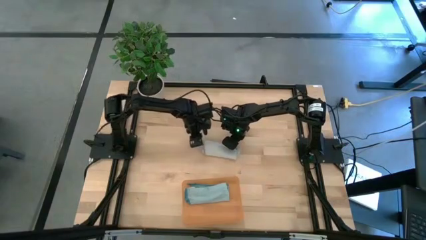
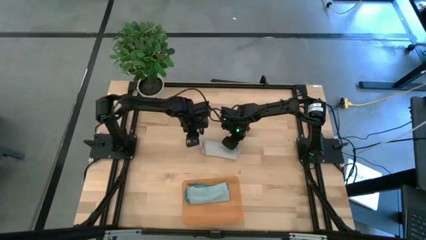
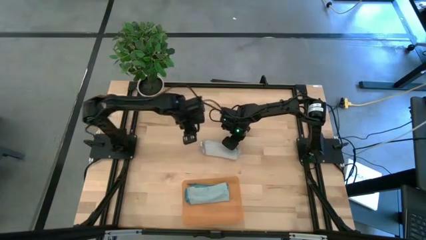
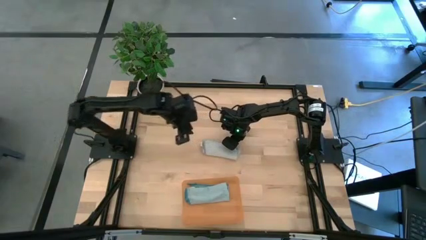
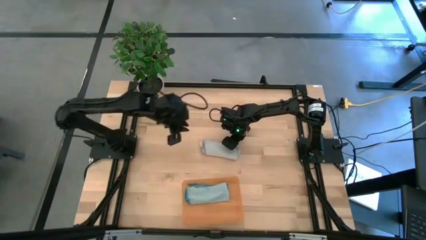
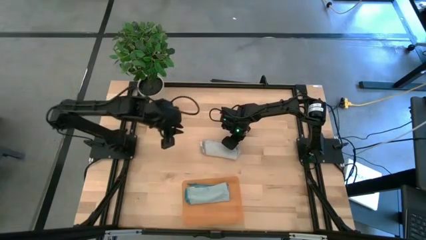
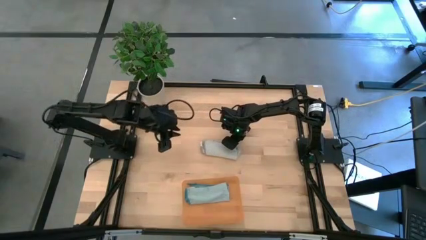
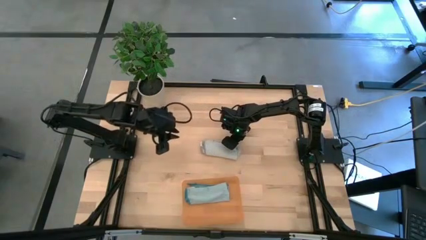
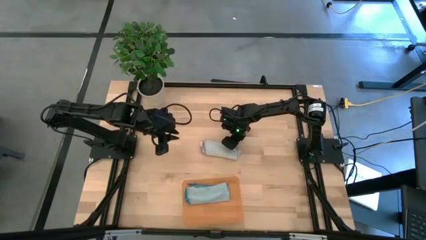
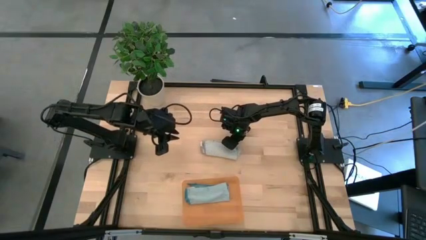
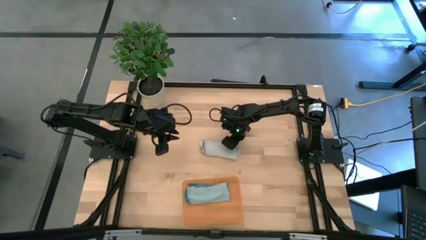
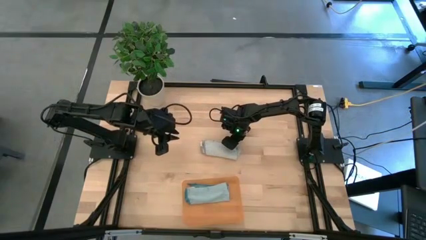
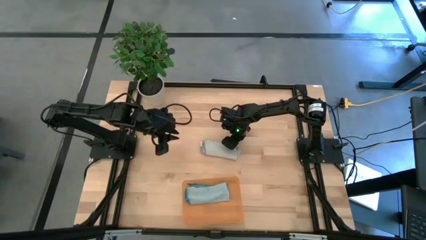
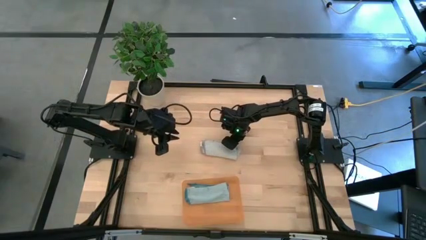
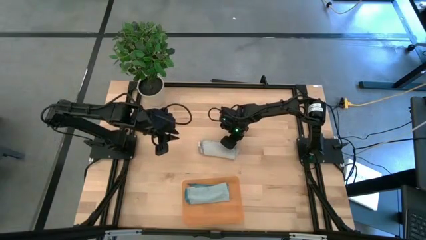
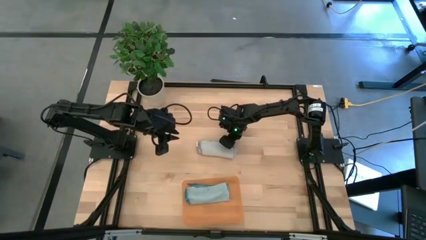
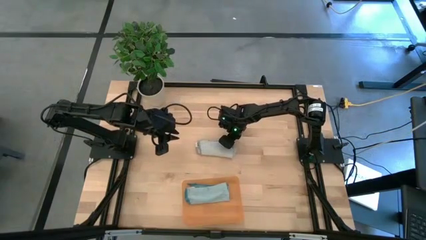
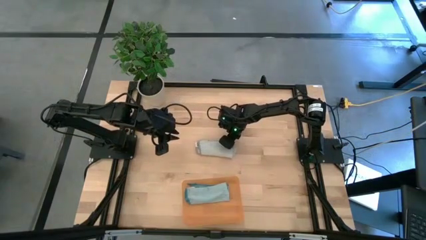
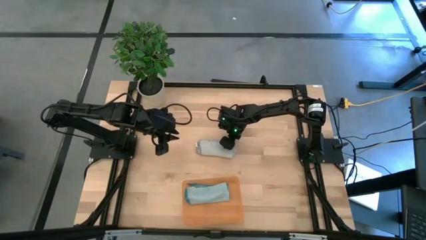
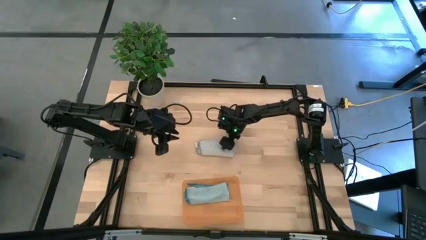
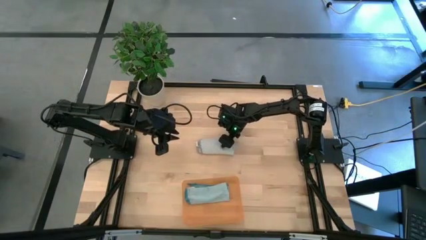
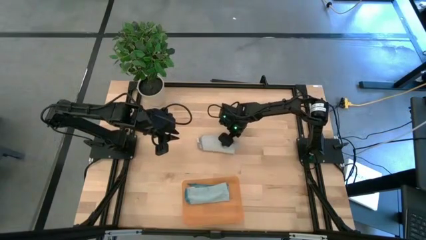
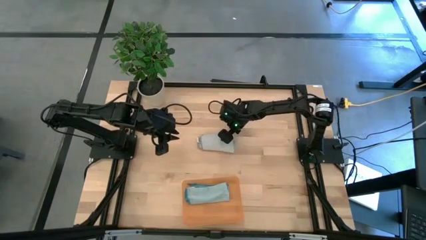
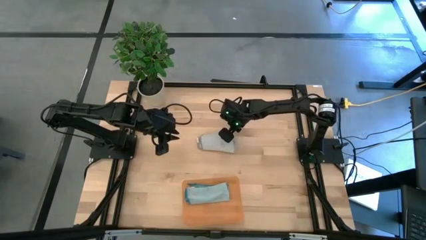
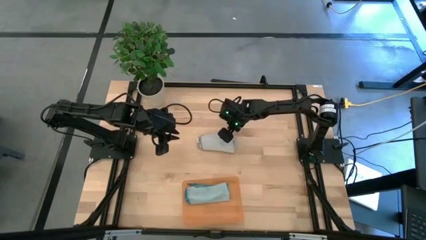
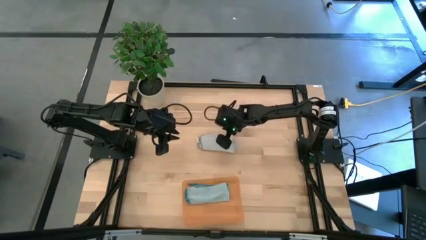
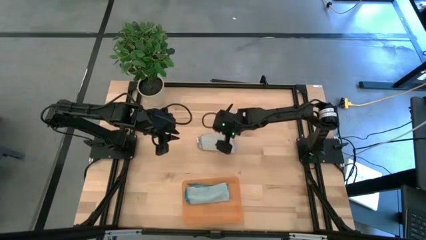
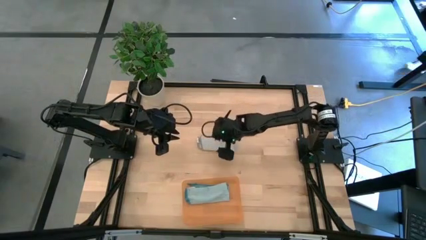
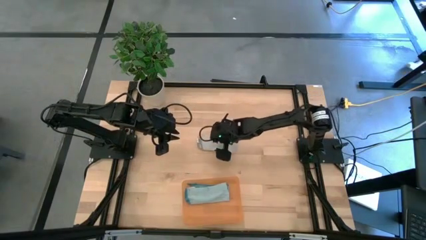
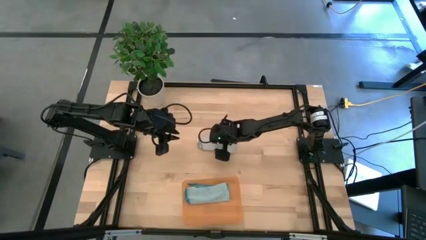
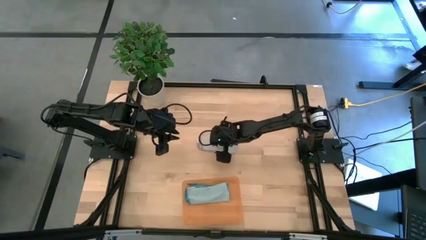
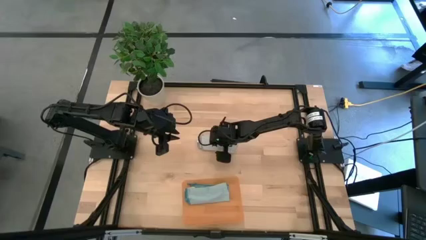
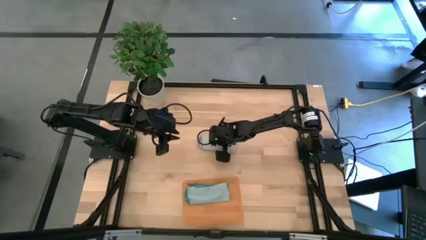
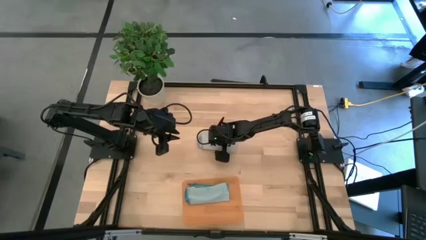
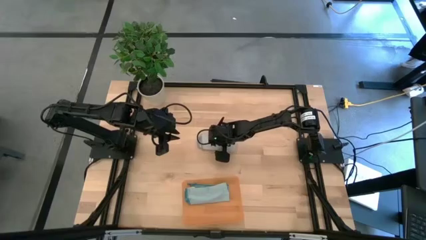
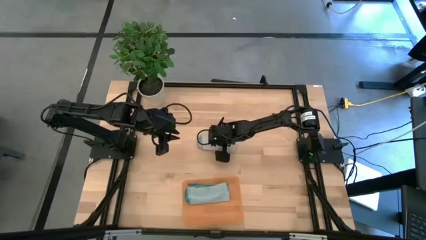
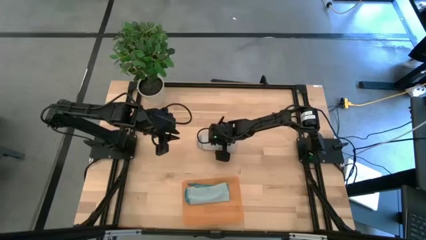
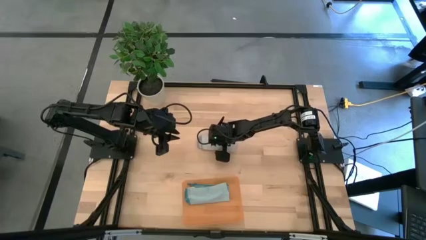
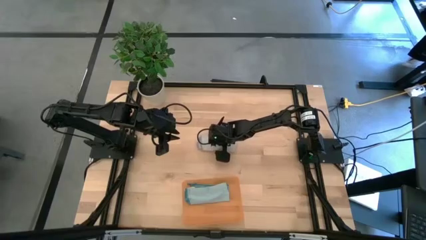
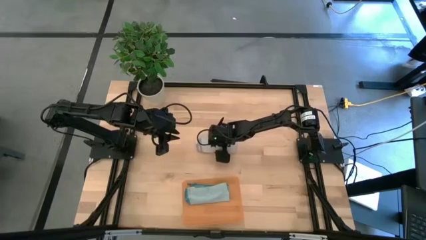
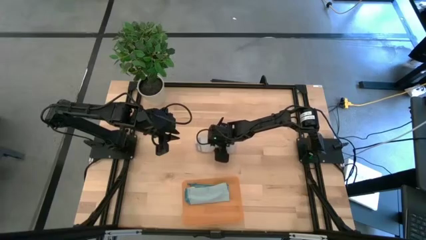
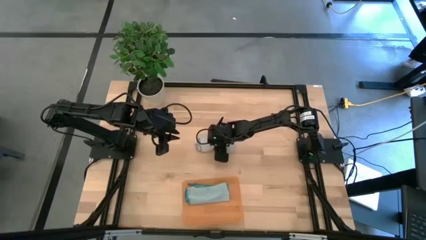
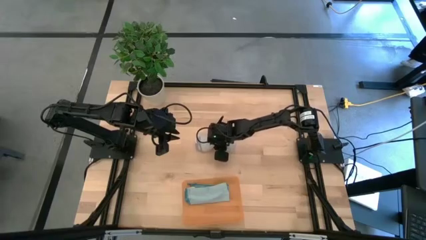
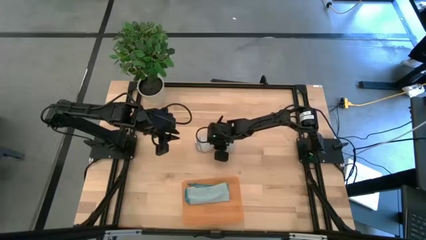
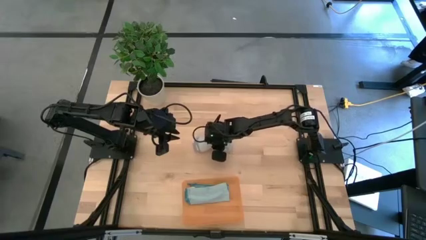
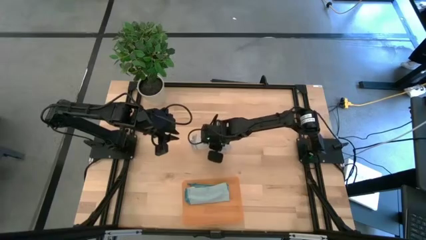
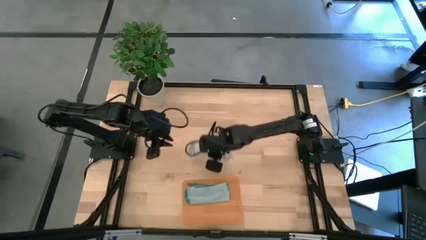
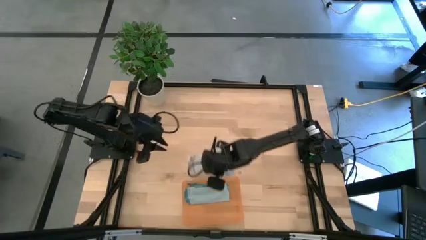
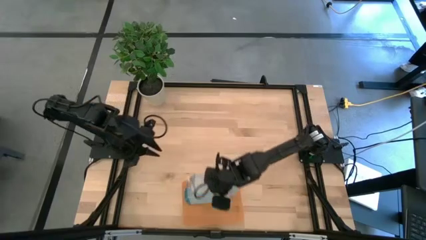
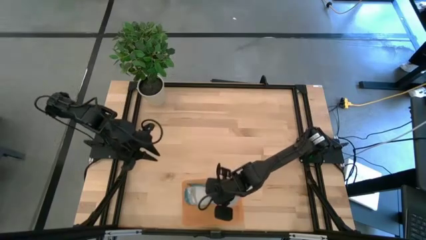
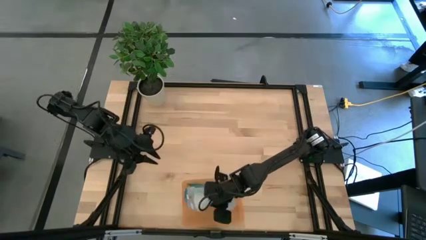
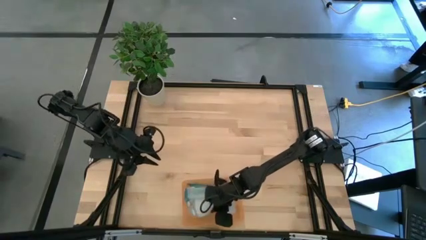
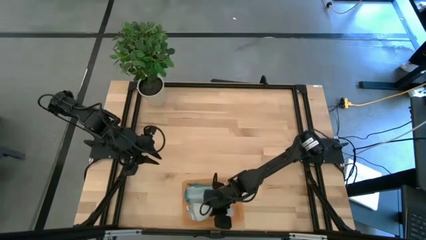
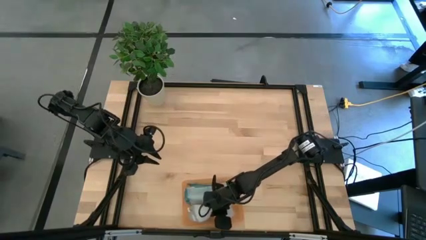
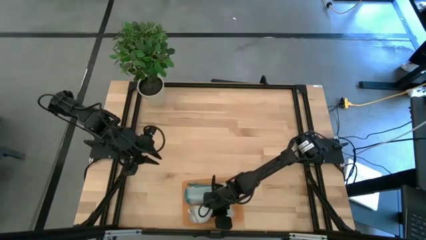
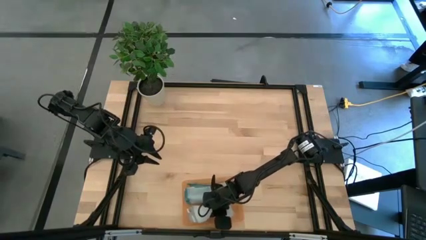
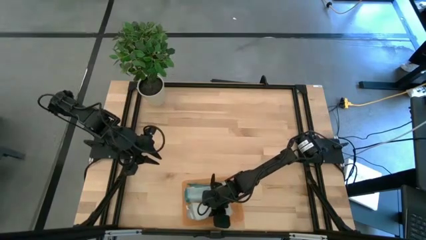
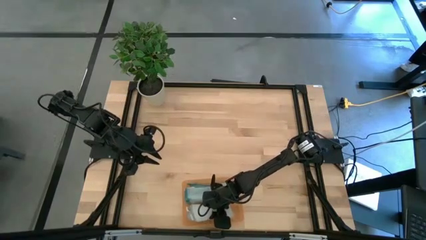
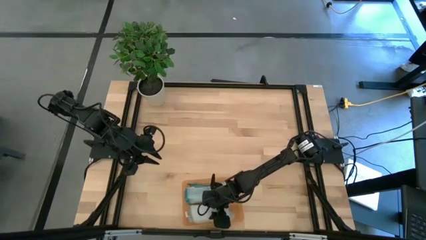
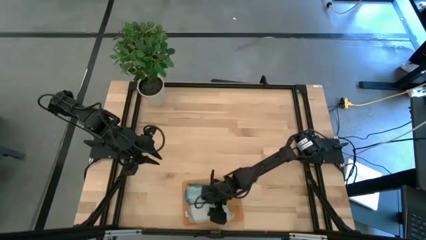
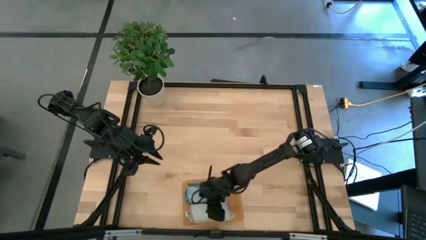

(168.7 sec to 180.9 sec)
Task: Roll microfiber towels into tight, uniform cylinder then place into a basket
Put the rolled gray towel into the orange bin

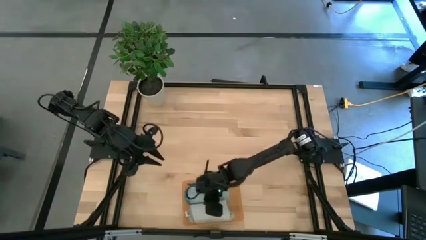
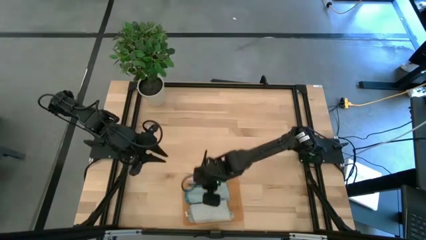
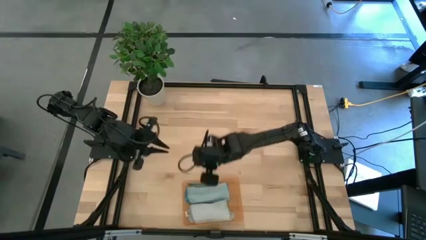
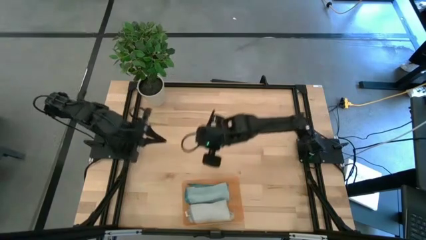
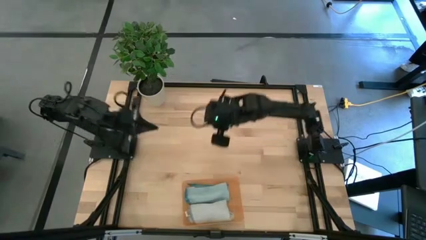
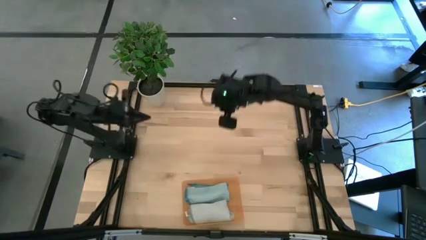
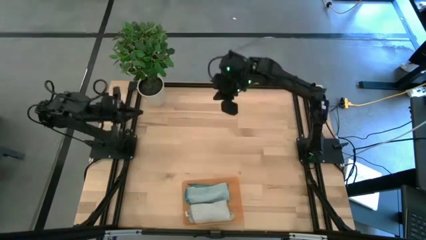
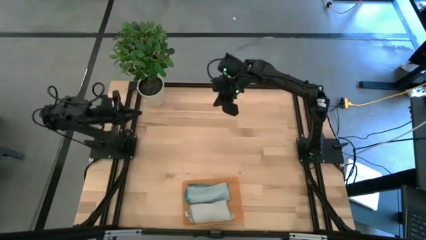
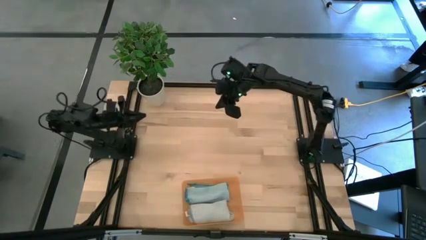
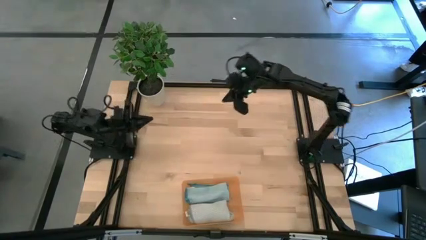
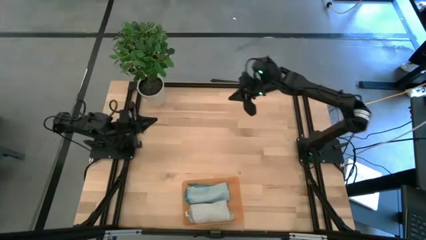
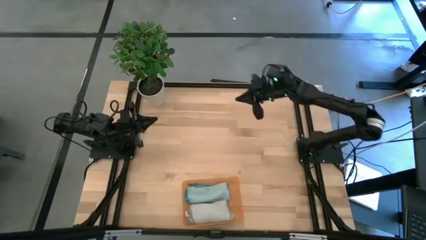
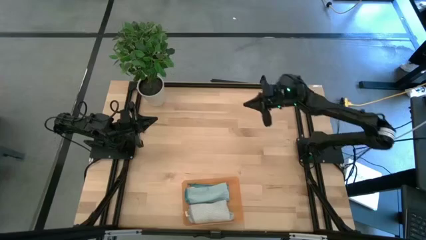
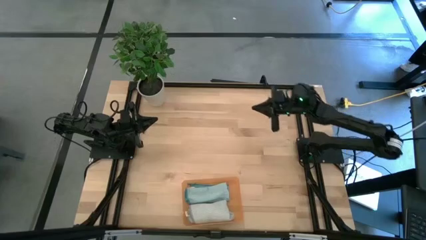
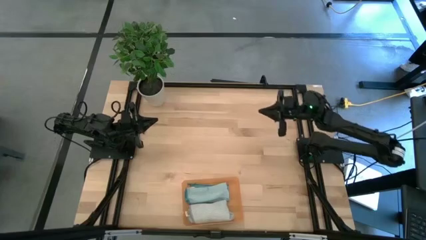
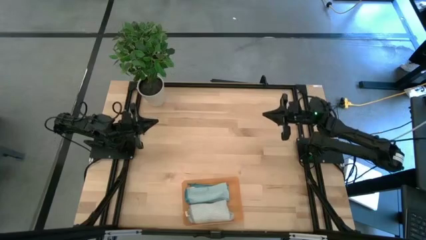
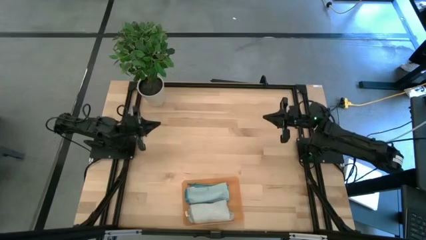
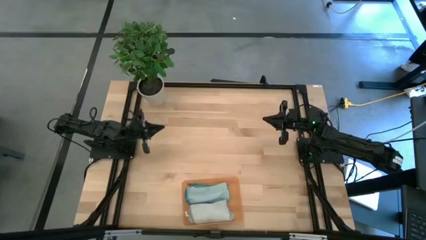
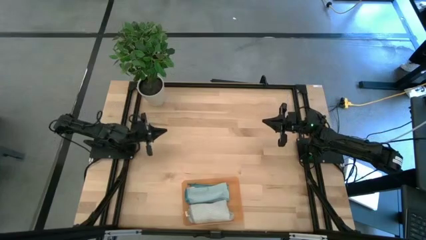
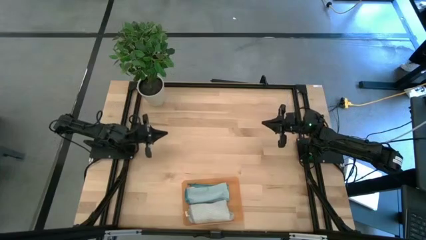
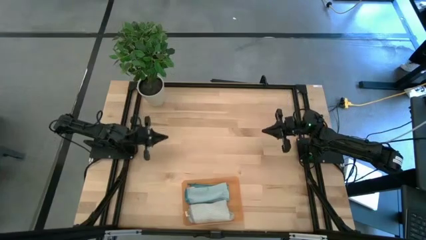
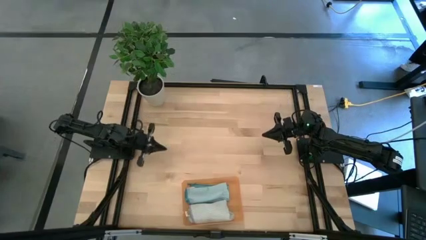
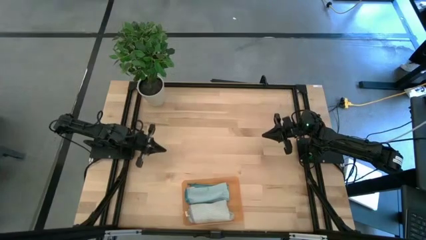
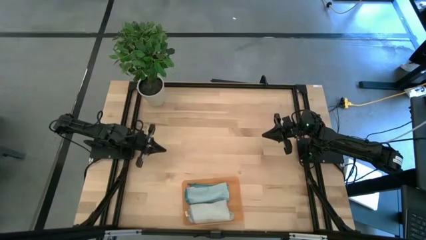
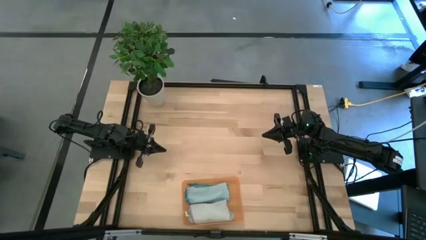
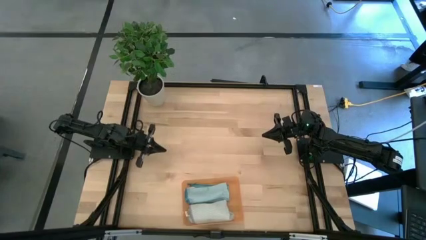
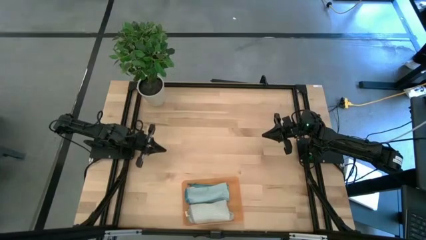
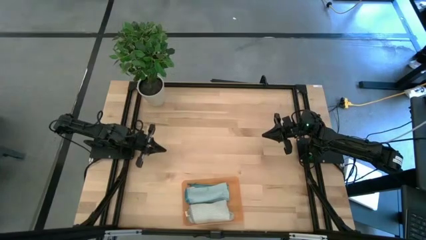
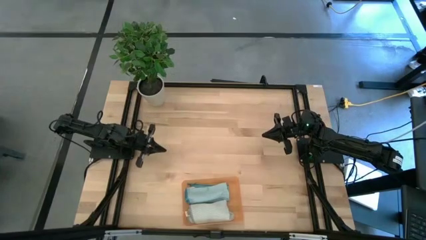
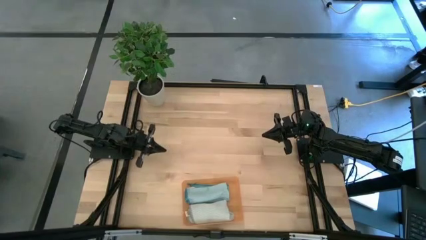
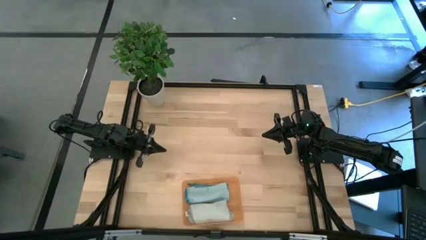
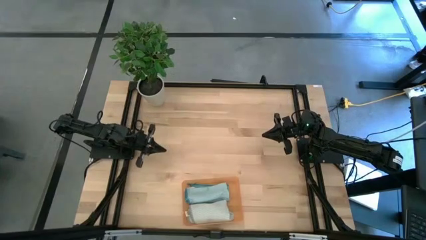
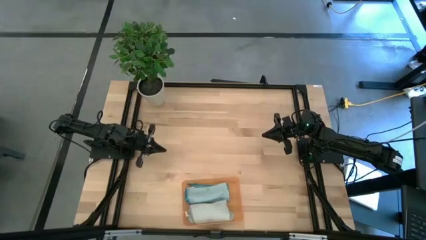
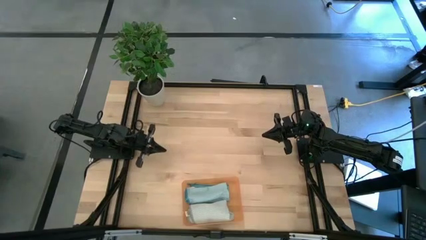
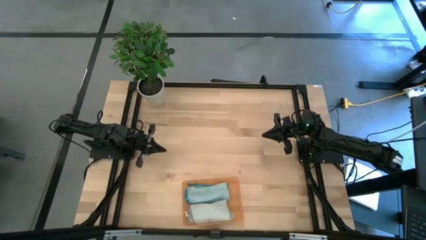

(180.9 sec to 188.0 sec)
Return to Home Position
